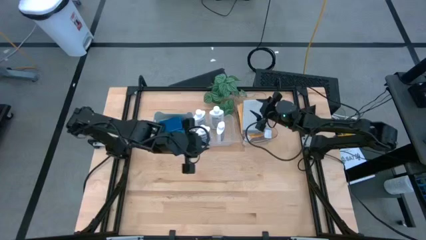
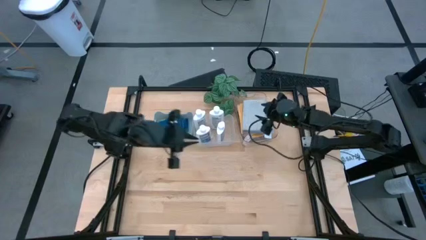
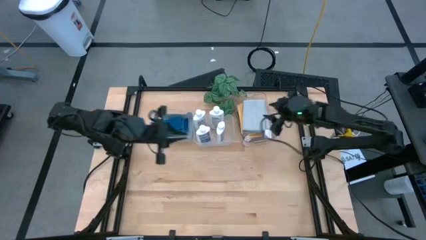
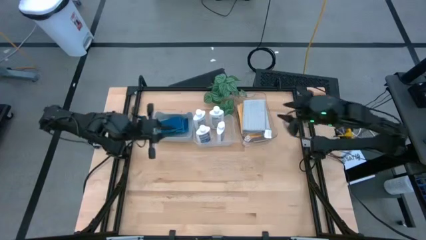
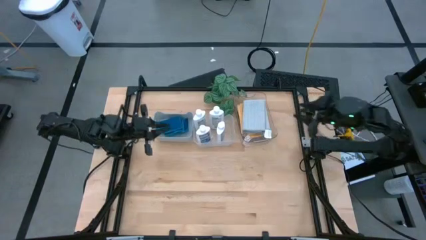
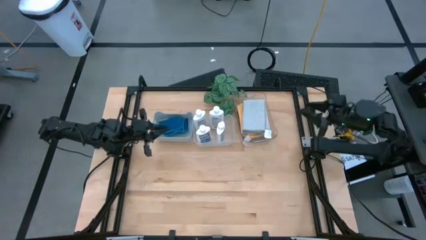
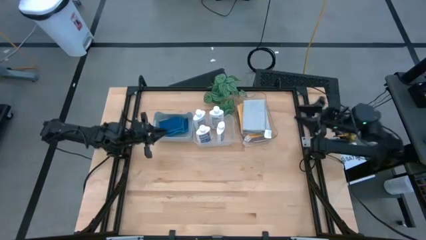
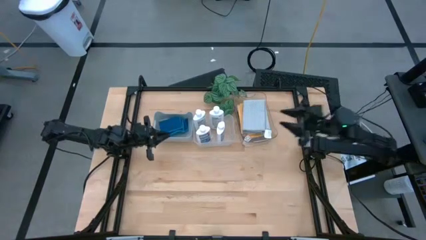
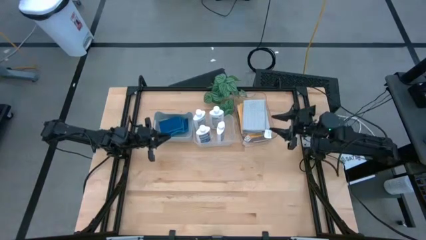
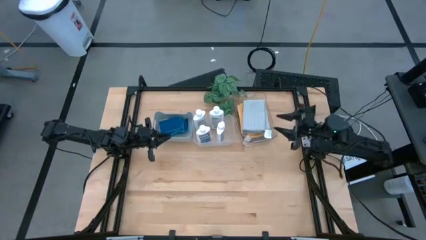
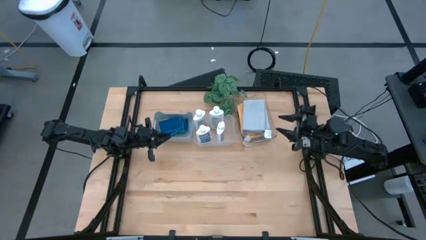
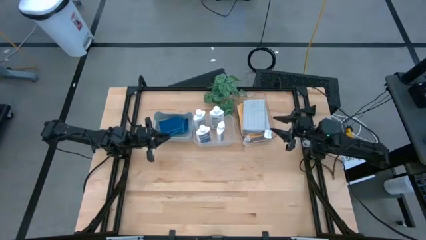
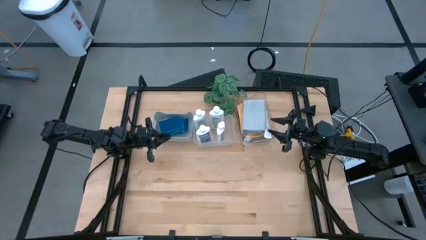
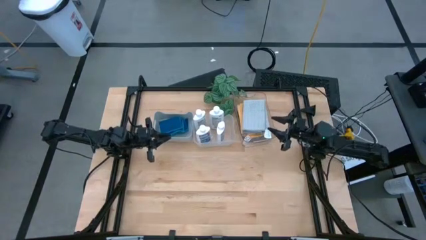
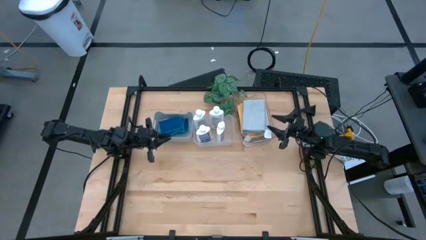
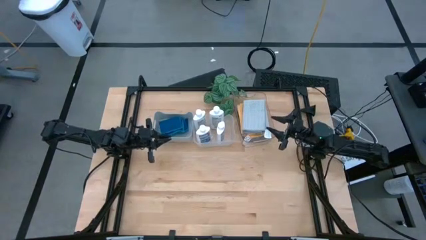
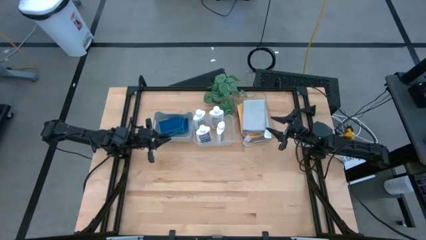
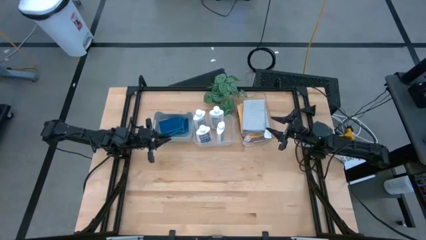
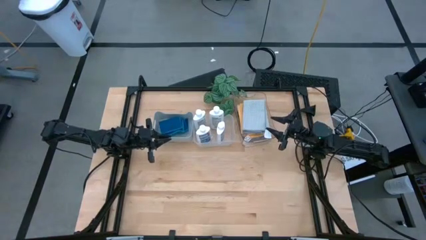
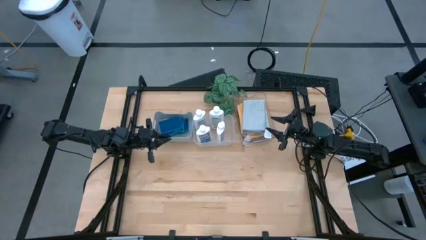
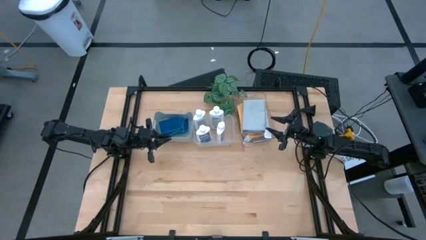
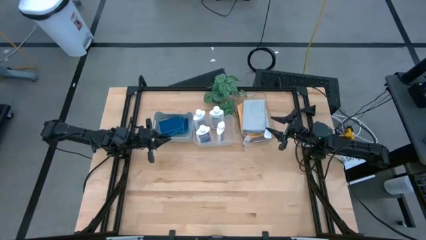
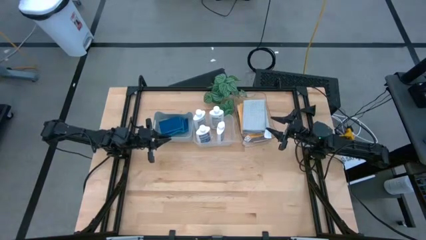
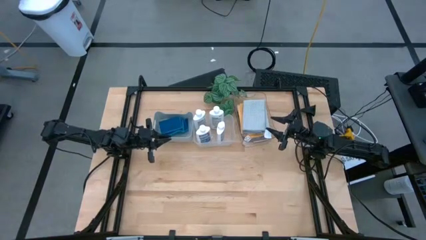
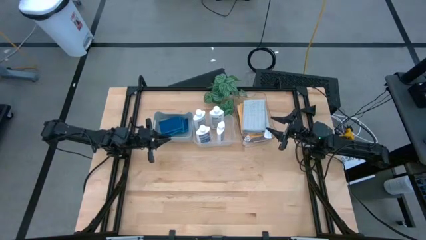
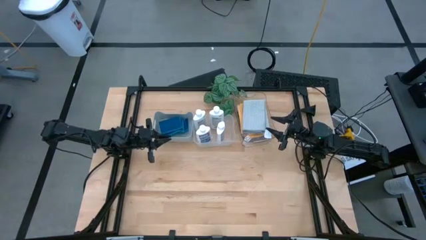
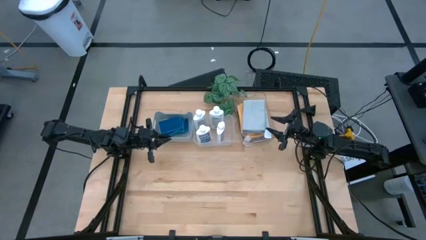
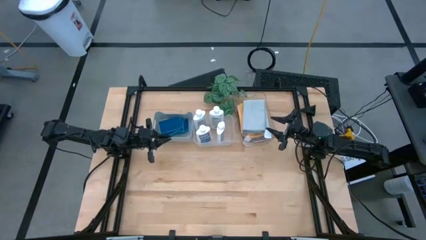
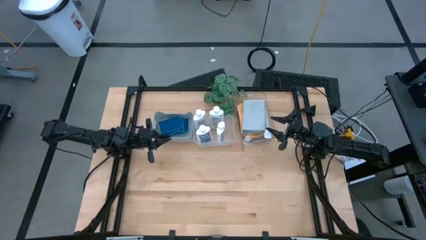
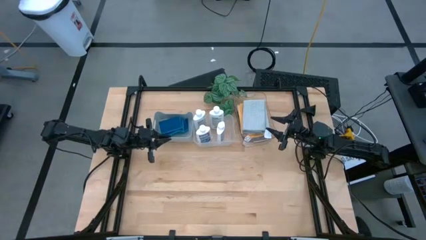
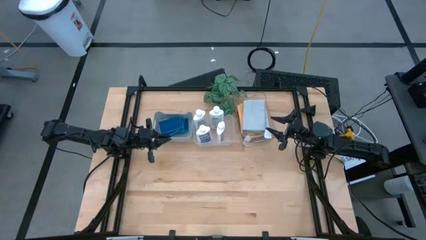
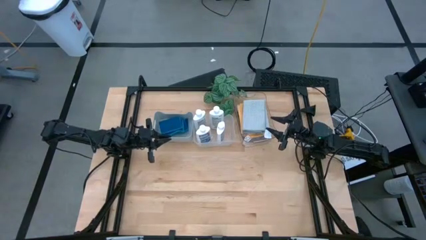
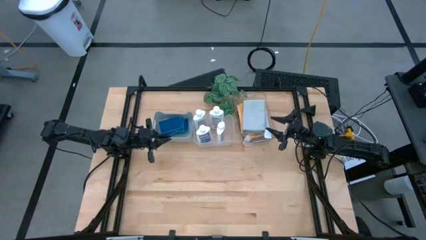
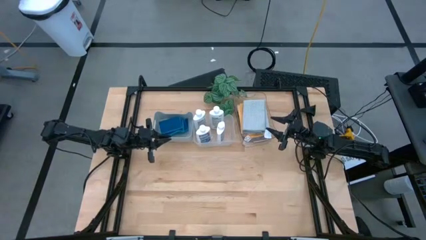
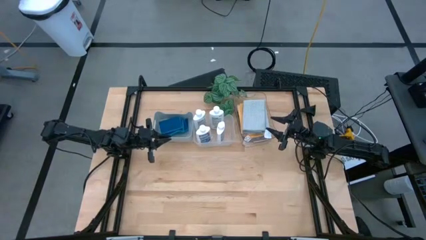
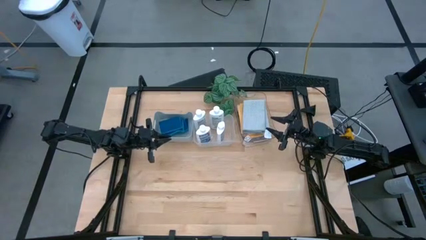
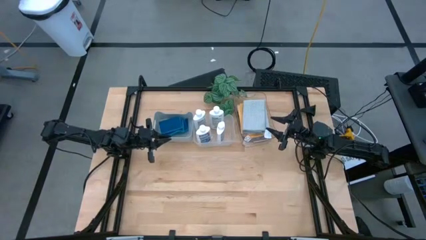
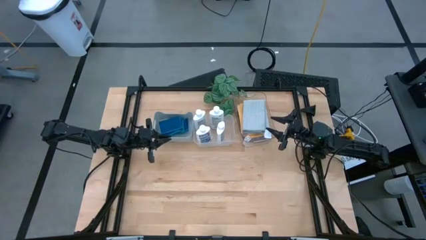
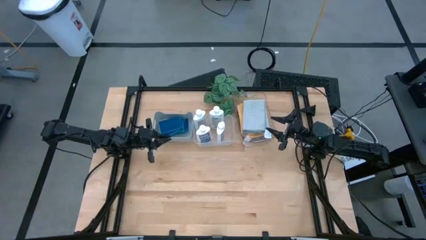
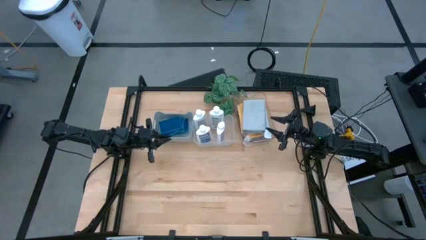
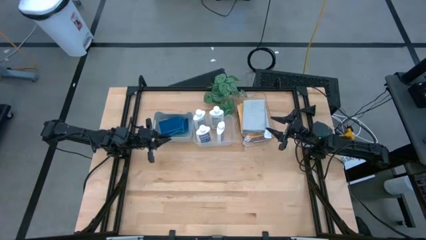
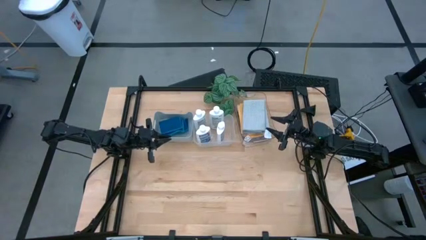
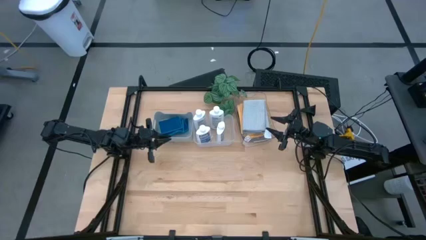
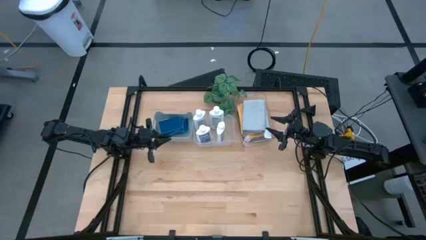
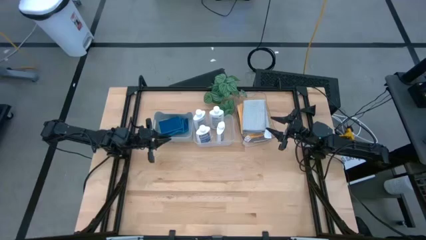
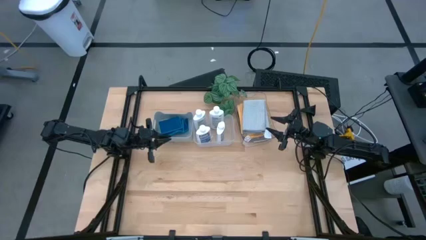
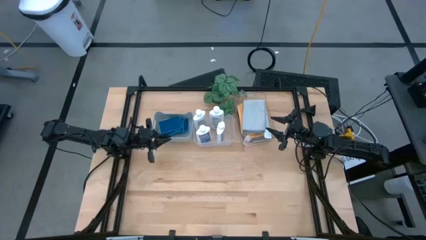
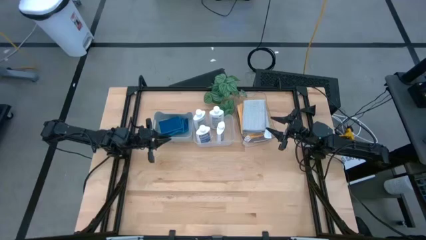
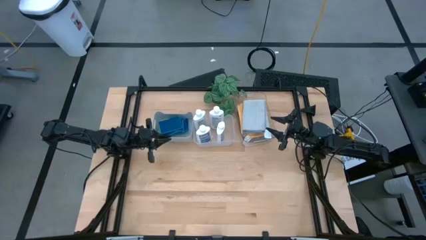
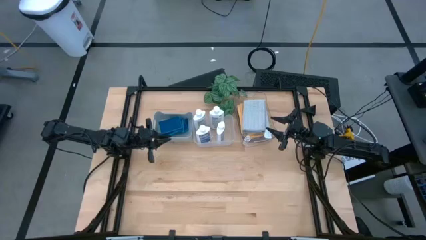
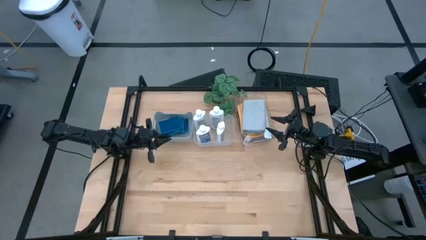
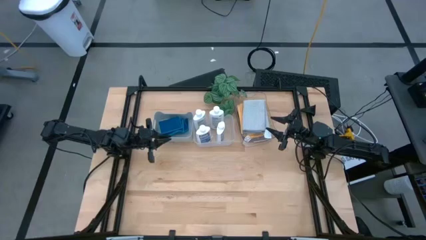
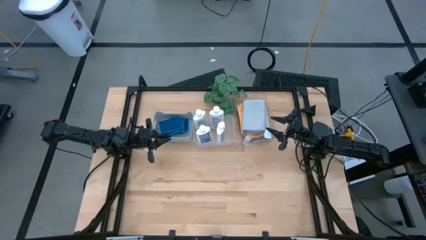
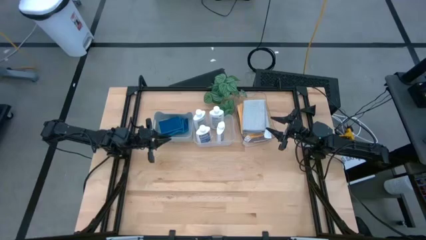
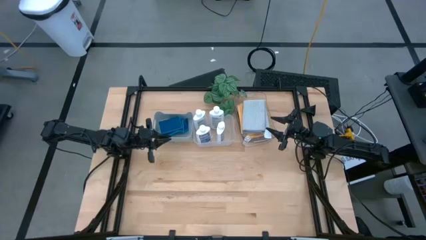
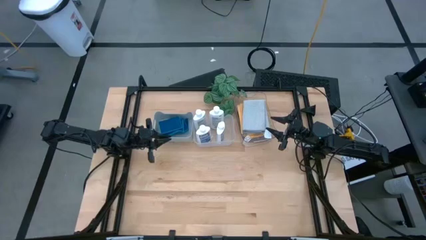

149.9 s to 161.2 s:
Task: Pick & Place Kitchen Items
Return to Home Position

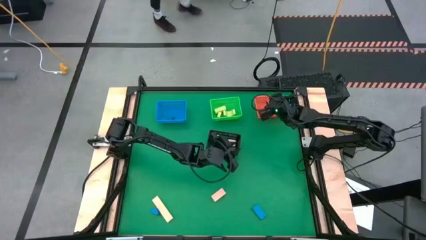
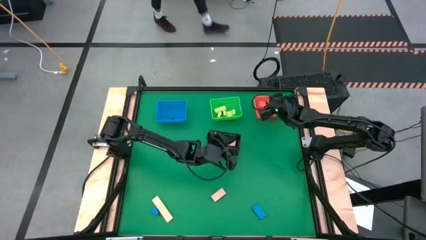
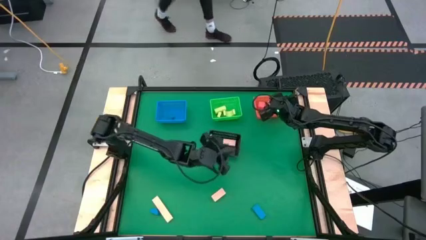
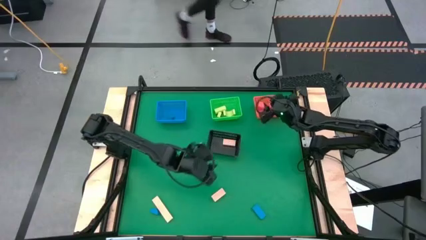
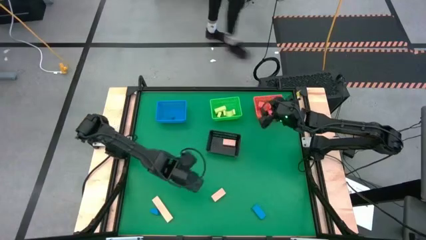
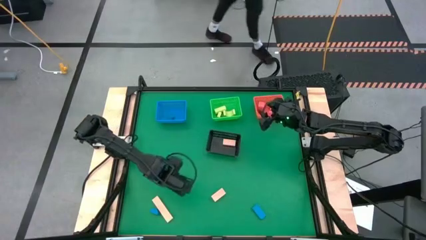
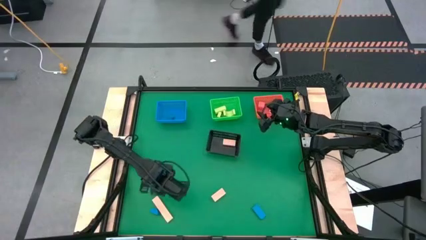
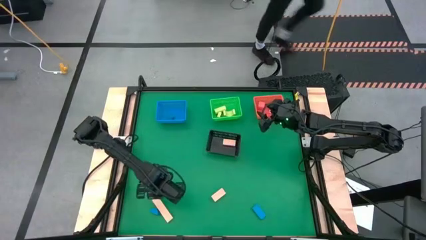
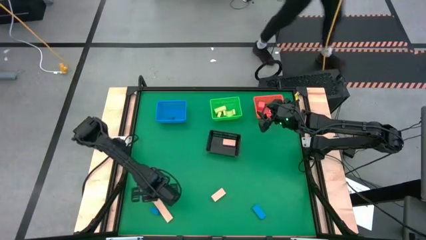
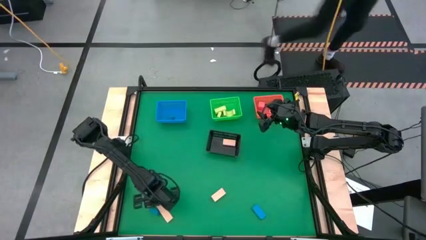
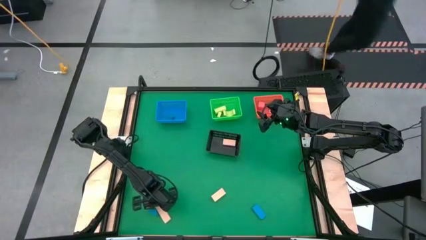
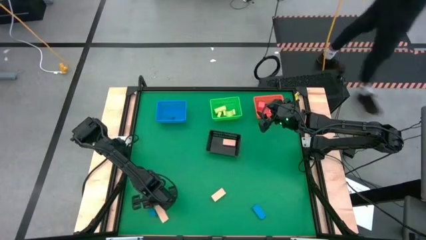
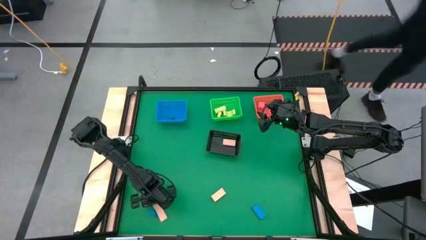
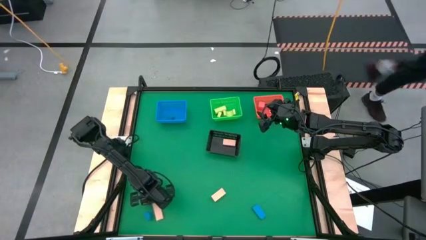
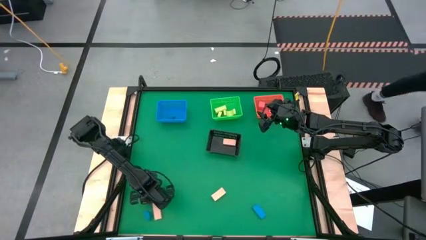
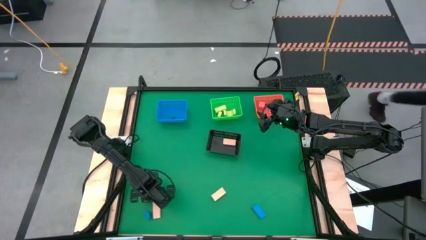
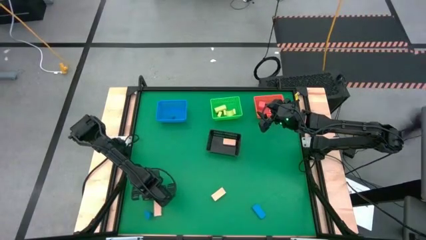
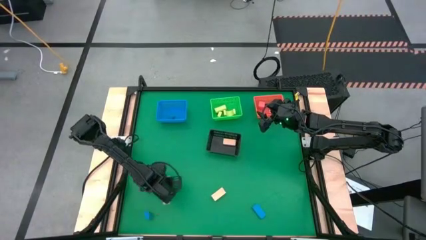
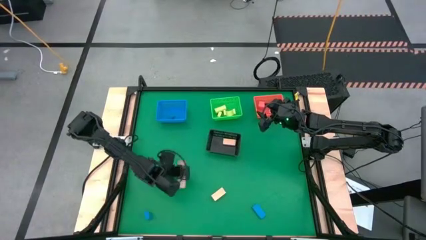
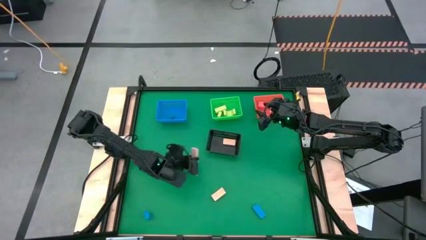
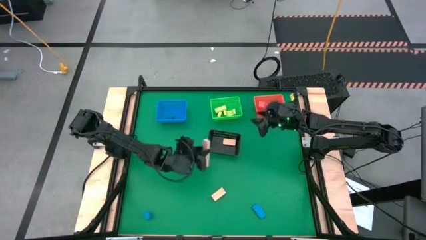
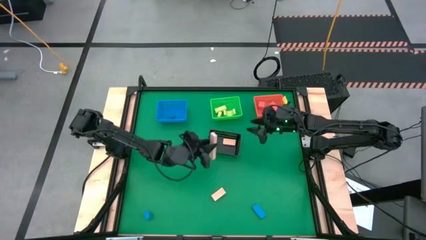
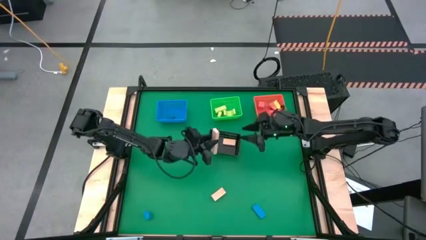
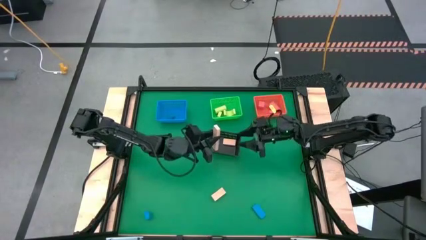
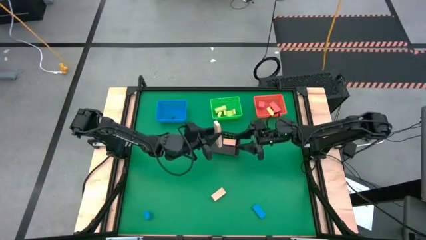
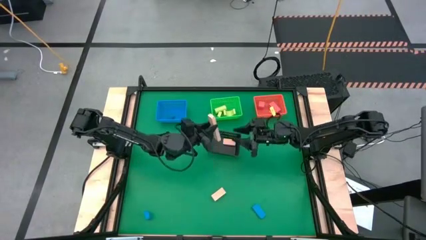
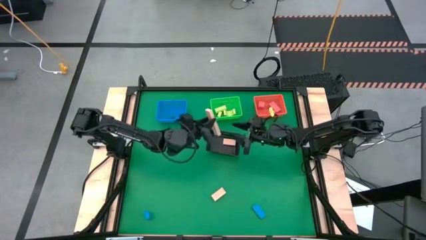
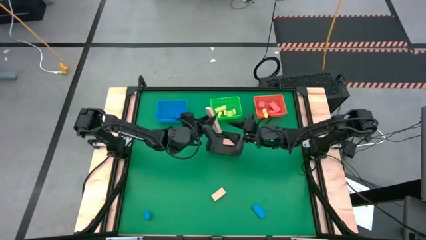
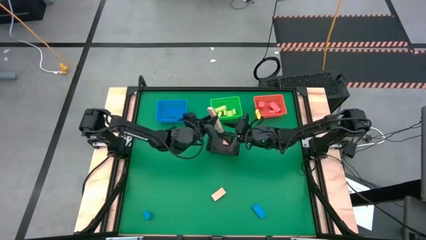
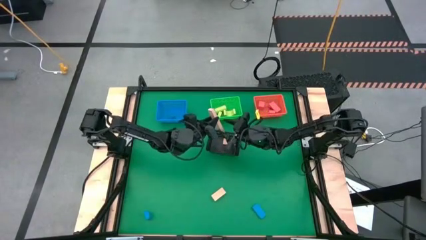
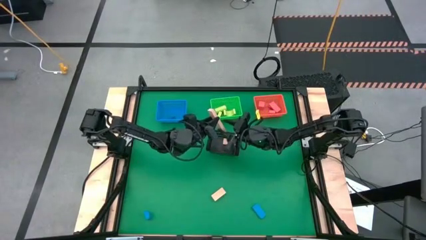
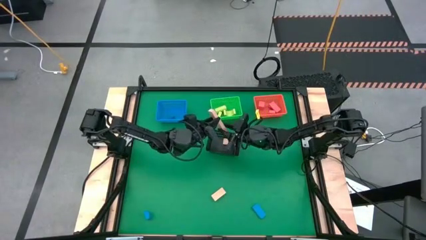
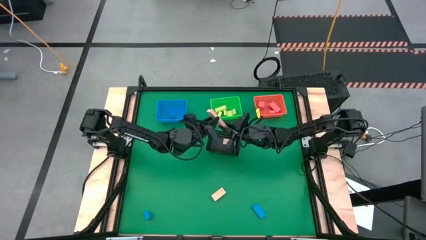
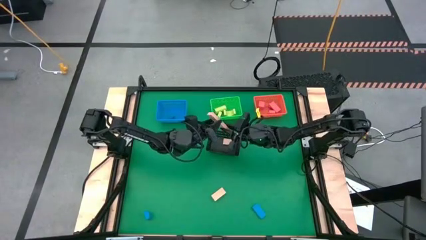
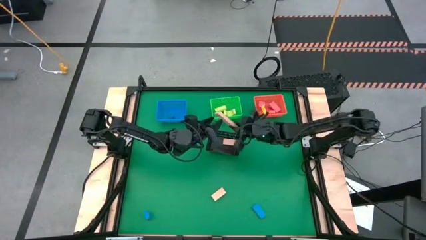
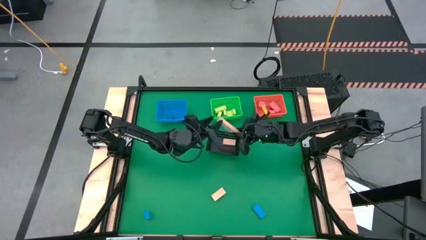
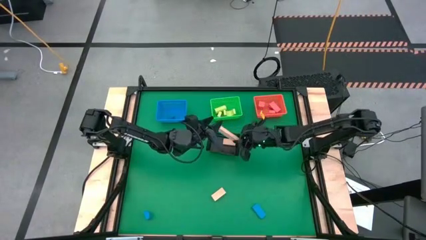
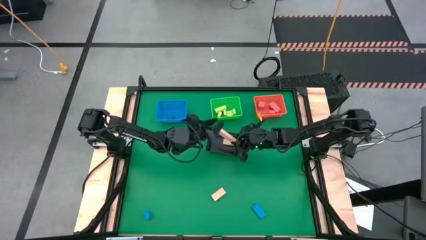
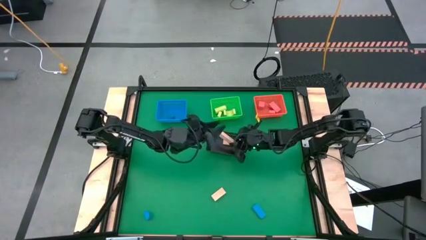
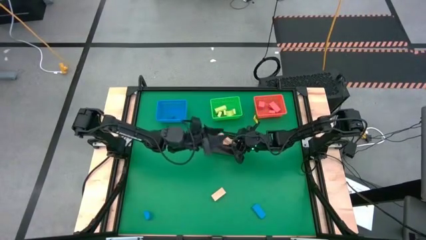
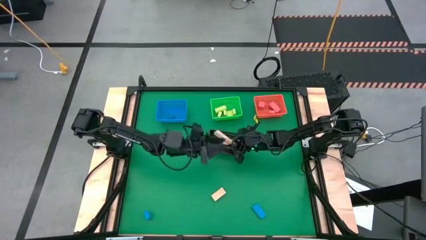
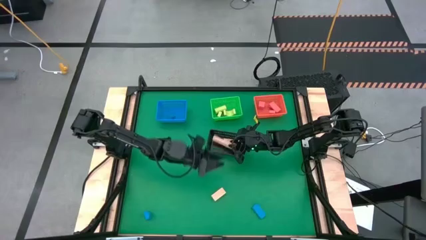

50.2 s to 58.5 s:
Task: Sort & place blocks by color
Put the left wooden block into the black bin
